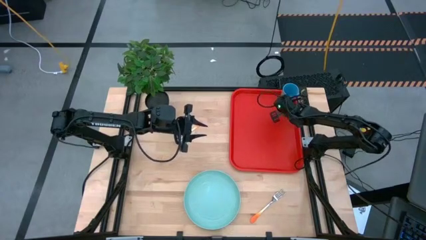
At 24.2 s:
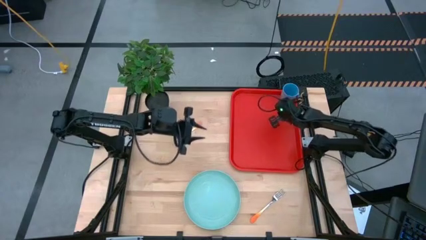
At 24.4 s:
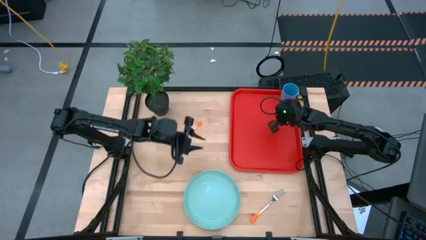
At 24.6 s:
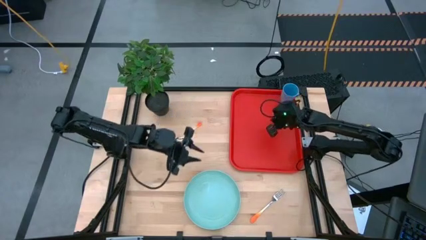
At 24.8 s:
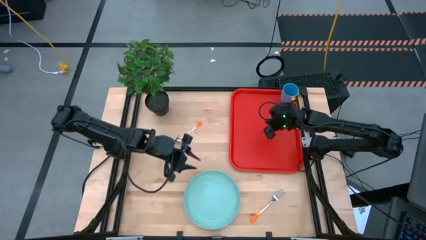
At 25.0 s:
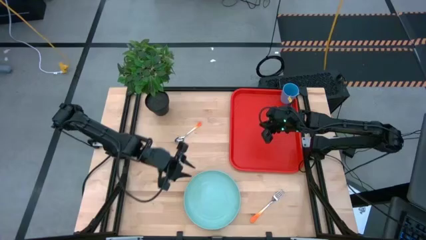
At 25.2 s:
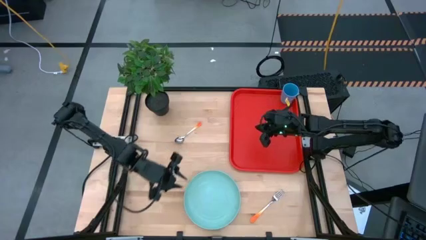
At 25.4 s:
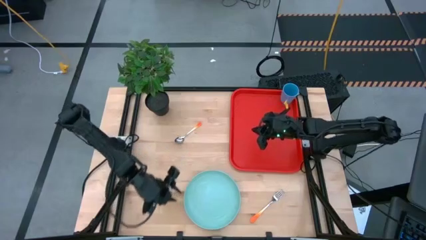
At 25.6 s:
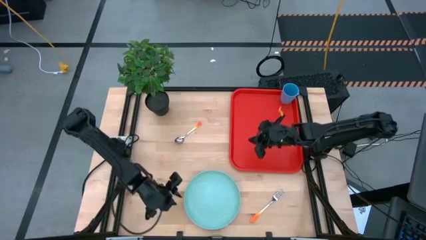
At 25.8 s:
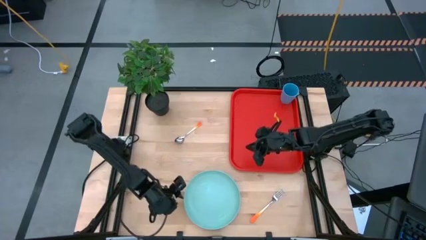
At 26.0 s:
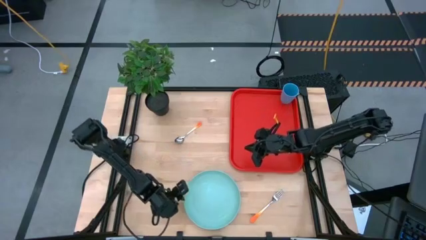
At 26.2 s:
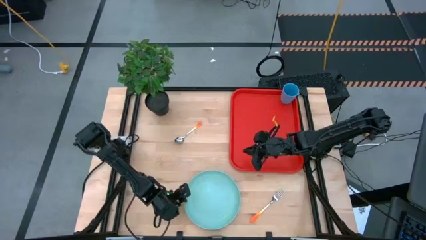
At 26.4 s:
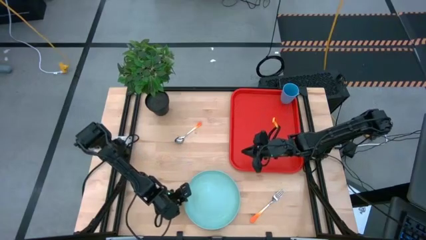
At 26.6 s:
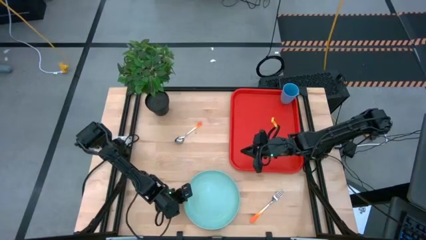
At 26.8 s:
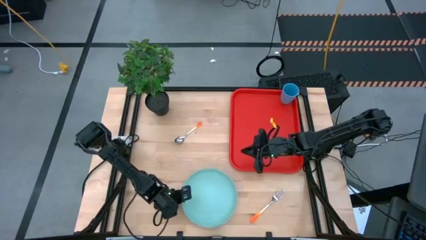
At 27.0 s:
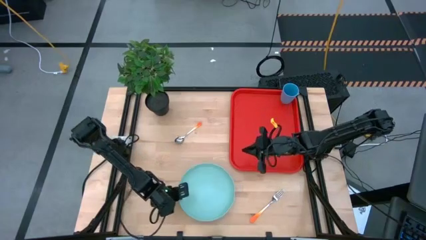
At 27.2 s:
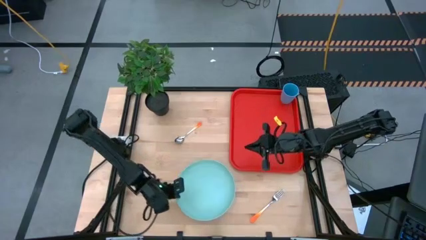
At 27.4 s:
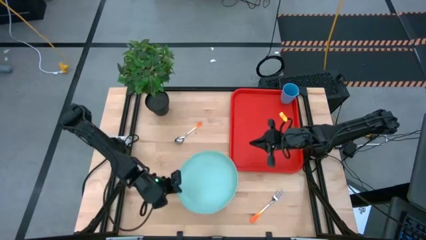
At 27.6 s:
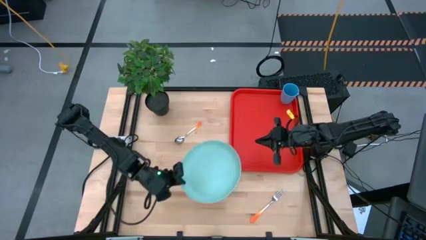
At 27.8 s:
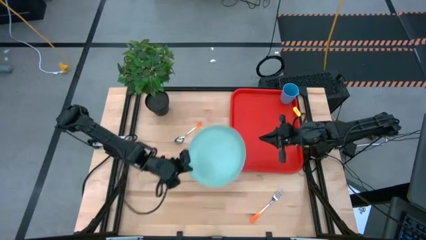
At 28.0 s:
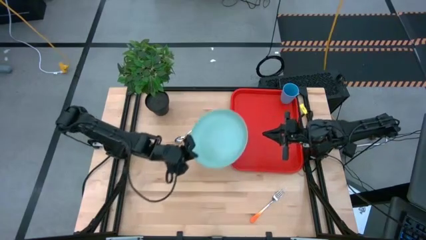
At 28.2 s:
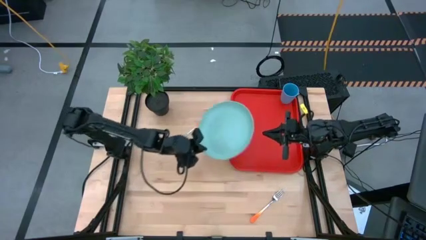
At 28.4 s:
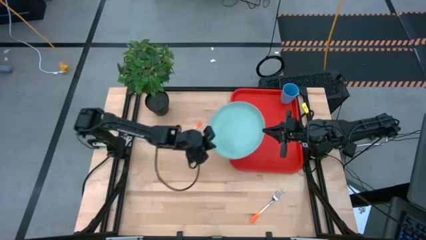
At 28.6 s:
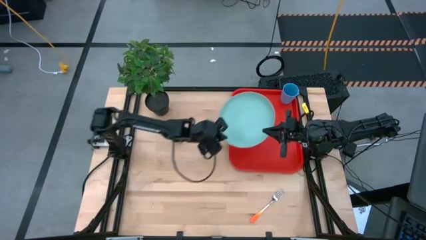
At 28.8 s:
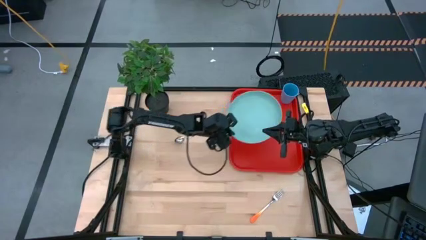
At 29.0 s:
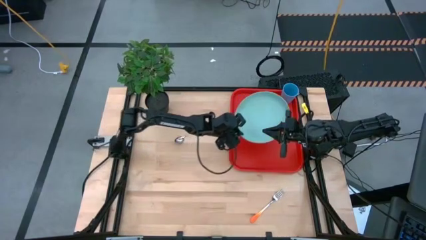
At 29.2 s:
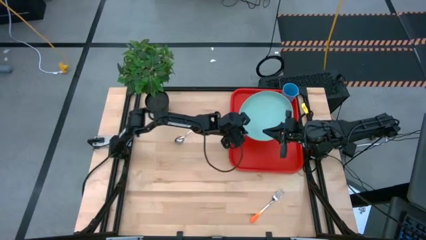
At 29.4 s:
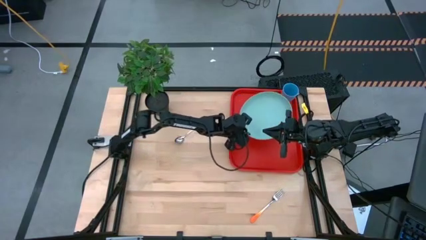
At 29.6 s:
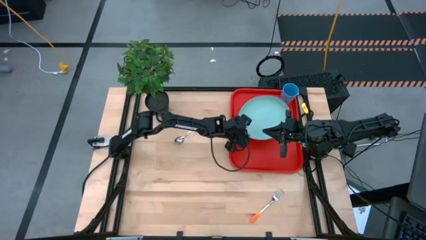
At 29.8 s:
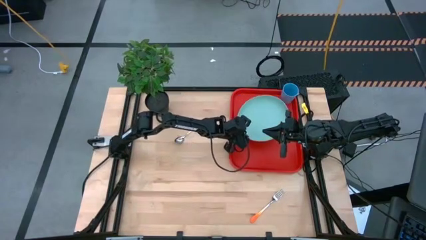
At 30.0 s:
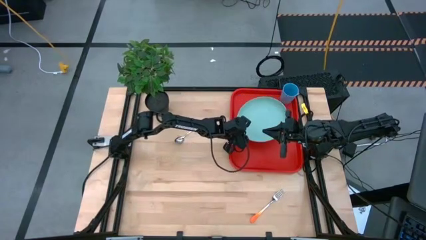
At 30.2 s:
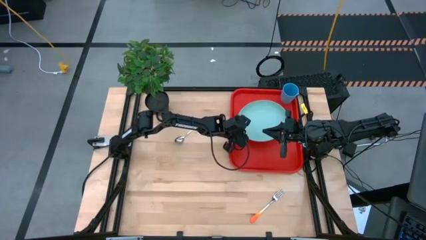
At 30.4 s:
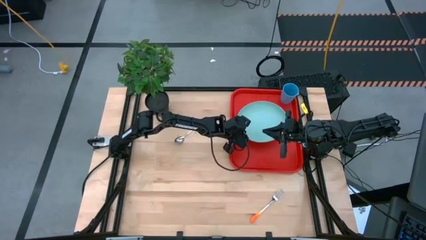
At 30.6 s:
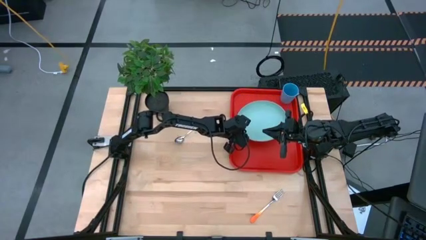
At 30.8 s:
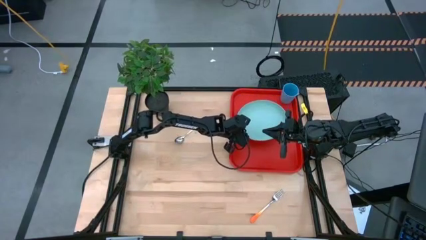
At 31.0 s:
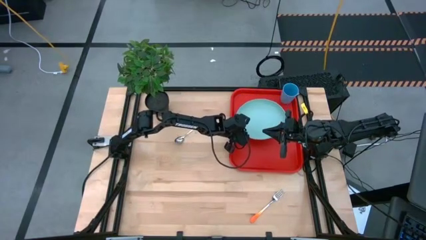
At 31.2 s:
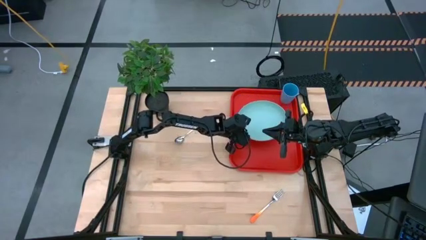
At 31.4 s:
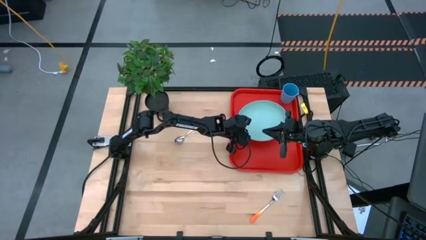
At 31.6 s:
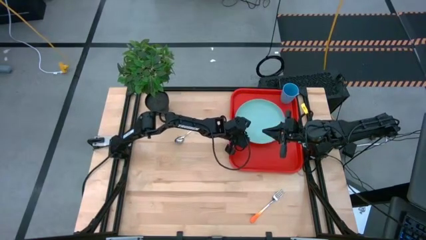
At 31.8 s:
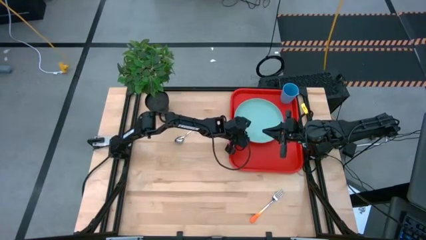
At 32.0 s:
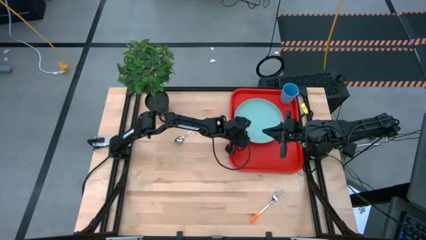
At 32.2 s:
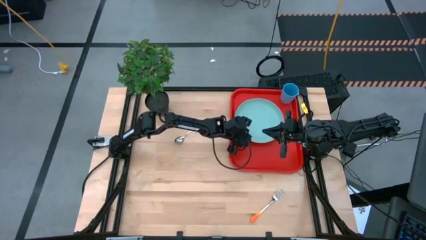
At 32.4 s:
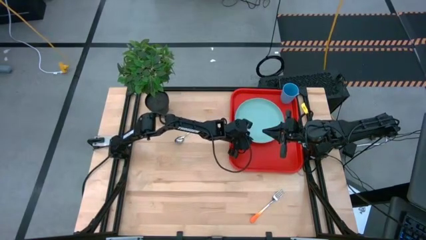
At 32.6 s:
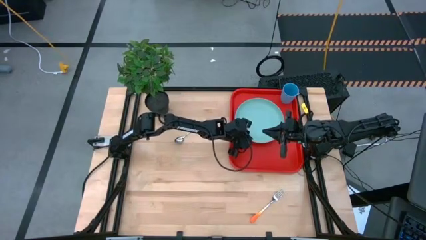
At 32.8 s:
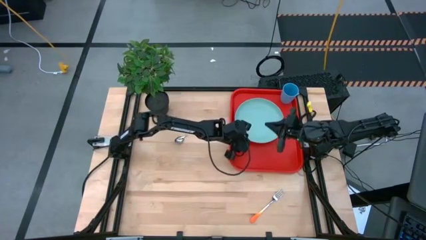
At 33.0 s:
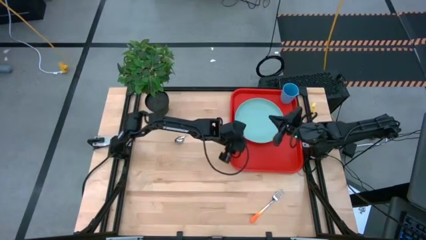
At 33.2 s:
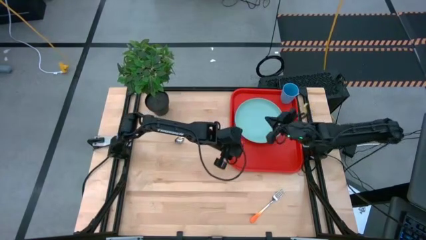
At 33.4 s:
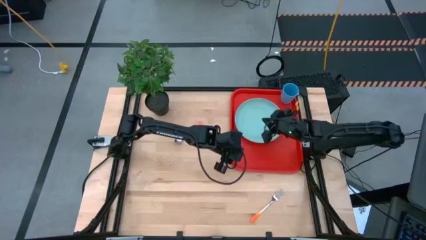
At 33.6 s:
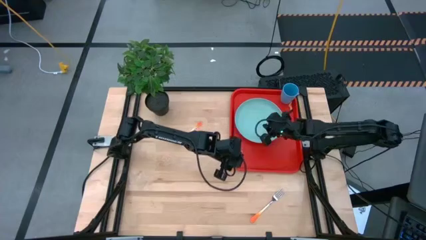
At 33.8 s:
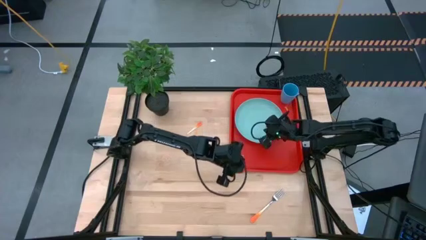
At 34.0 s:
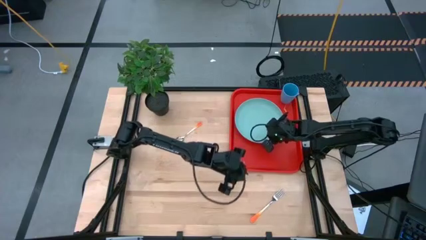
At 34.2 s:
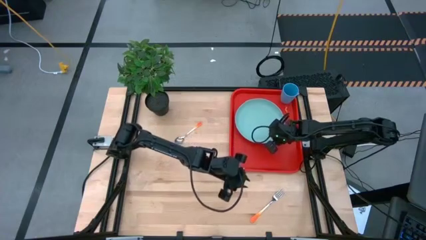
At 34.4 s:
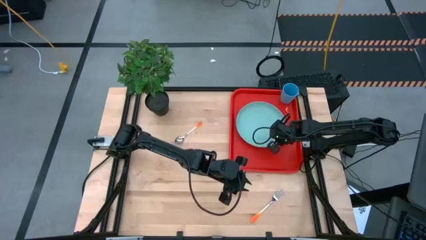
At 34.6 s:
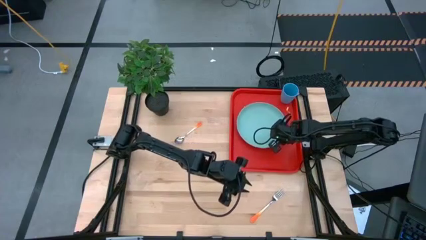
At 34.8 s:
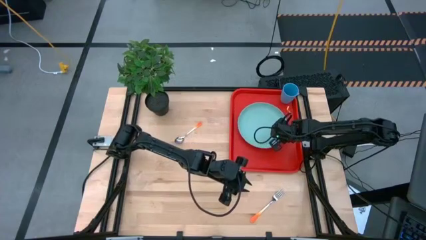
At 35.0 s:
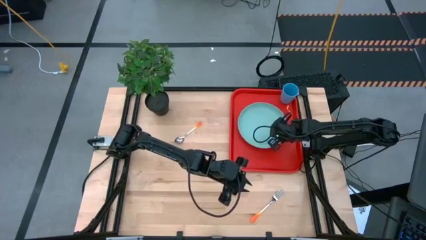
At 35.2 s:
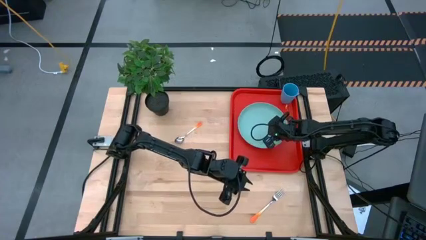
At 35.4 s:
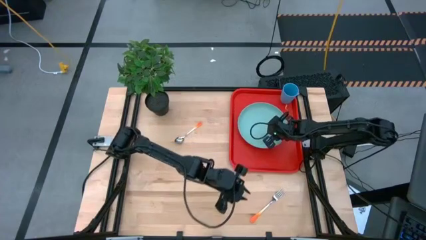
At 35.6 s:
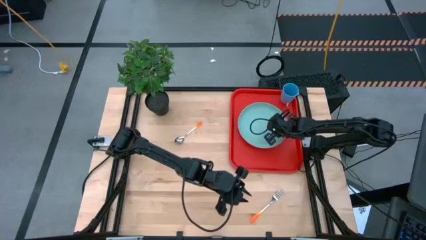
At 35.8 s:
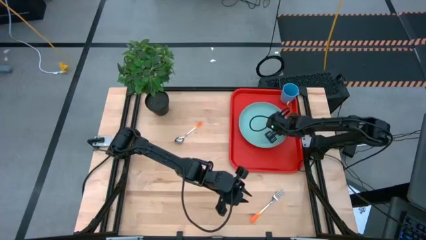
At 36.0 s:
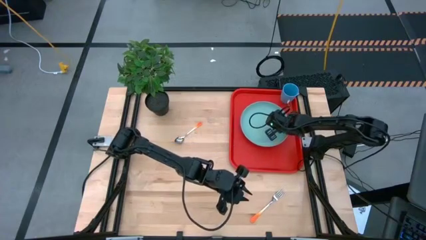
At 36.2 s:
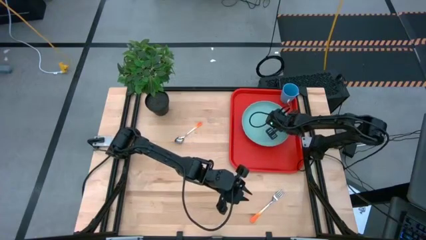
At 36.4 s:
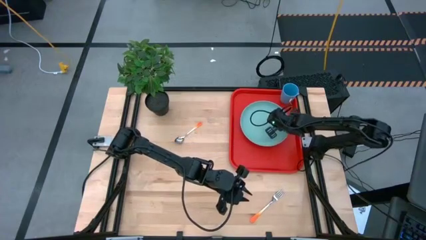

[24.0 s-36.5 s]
Task: Pick and place plate/cup/fork/spoon on tray
Put the light green plate on the red tray
